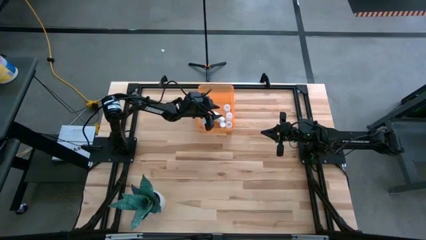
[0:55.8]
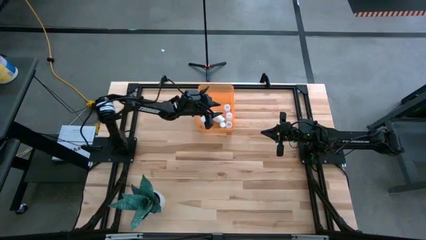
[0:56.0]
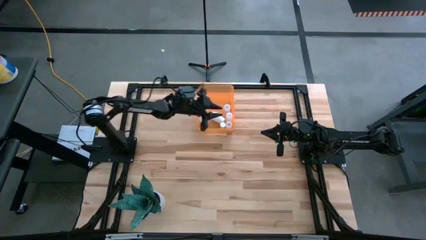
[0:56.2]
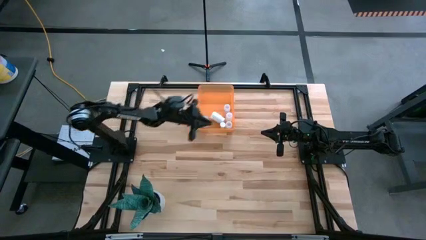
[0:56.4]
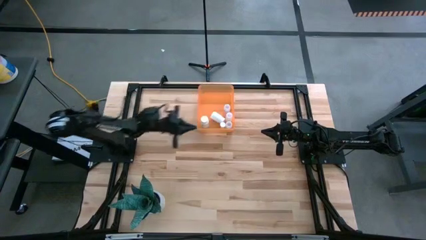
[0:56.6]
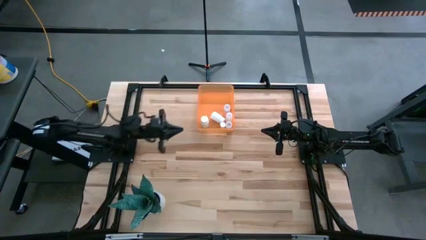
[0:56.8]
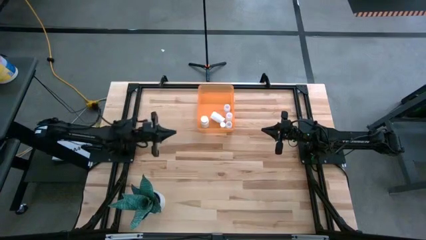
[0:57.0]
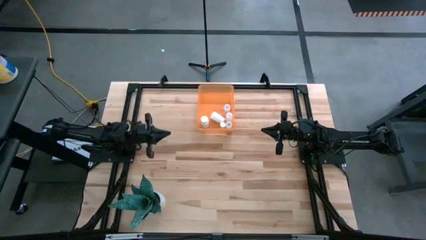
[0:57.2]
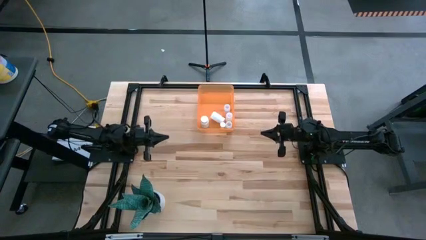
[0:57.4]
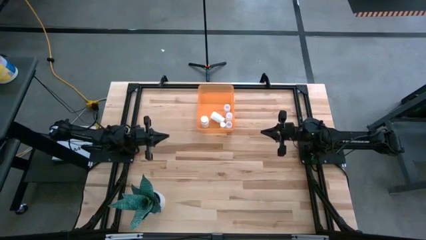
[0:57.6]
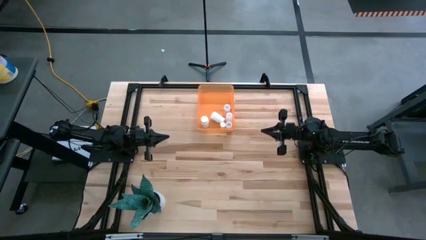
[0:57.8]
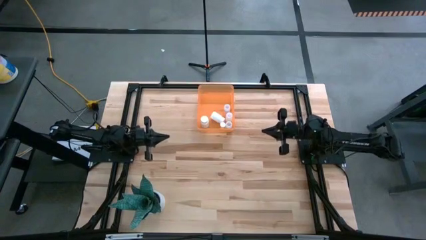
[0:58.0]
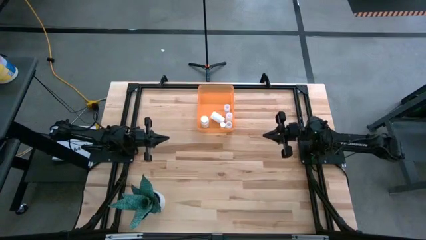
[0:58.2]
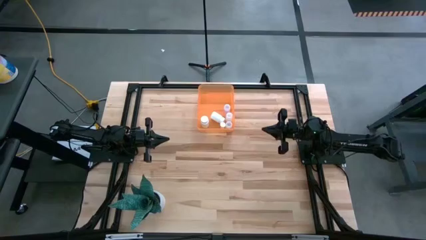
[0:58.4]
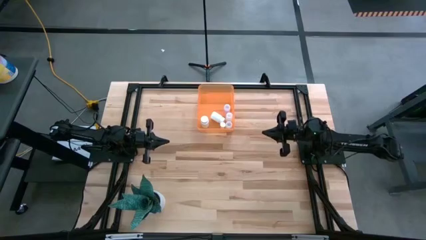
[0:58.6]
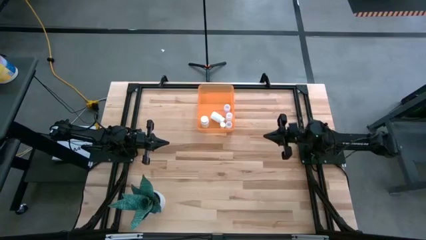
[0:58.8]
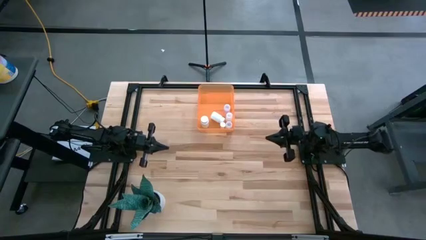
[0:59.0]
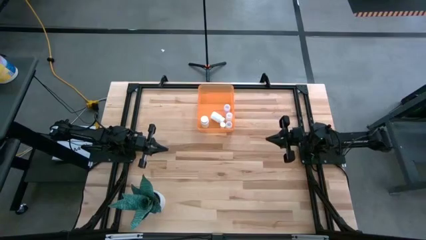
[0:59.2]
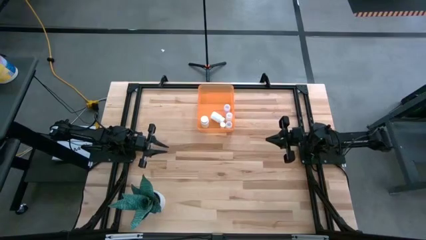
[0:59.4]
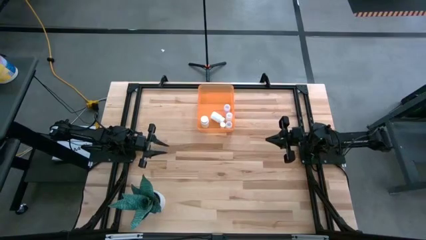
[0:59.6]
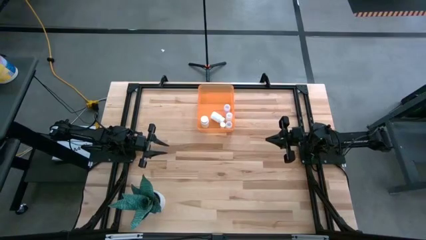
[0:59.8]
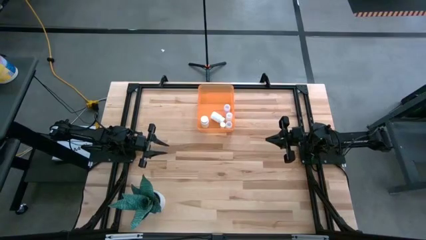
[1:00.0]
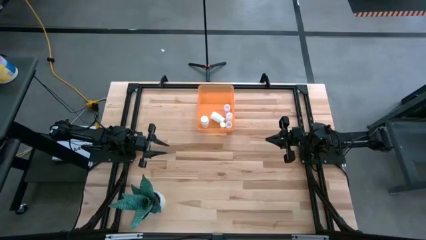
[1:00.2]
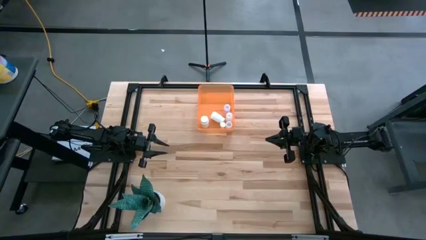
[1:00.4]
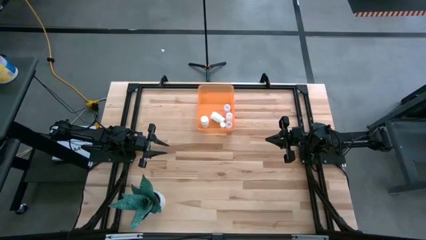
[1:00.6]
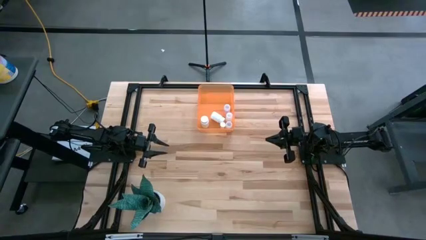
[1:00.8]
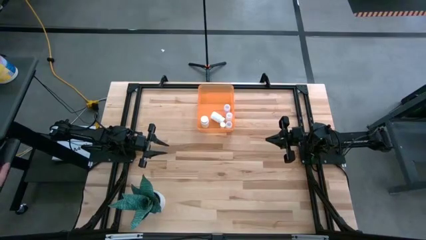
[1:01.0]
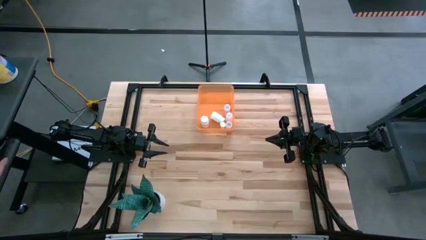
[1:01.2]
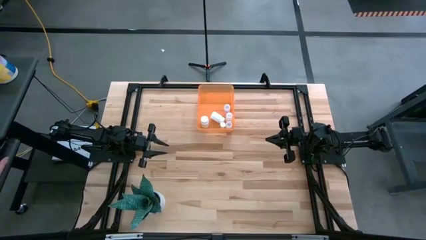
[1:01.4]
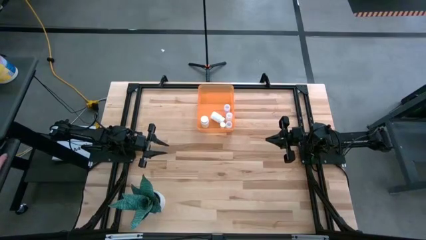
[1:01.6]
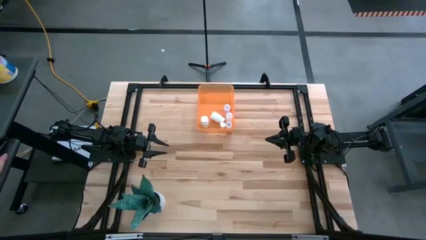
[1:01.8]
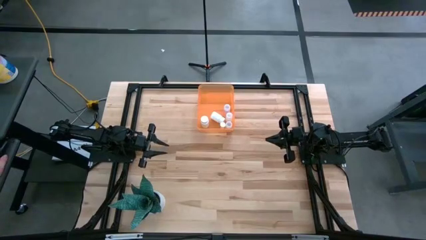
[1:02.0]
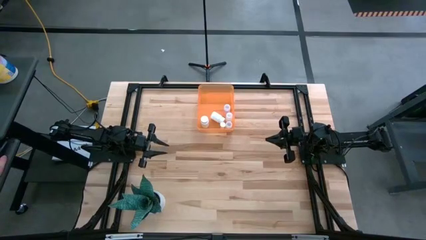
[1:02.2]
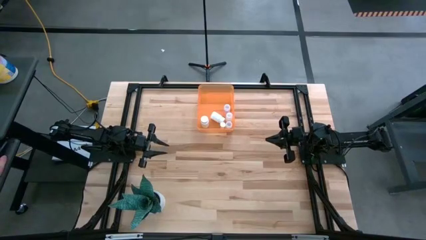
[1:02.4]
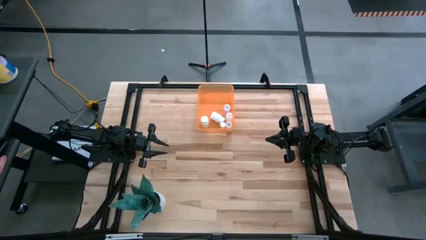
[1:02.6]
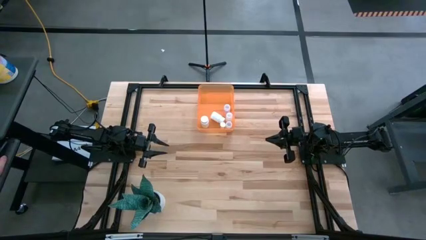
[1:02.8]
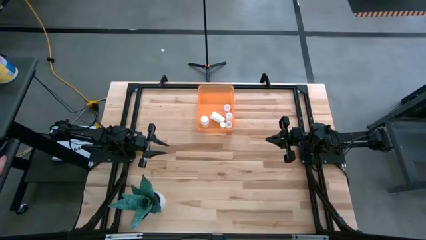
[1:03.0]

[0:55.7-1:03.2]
Task: Pick and place pill bottles into a basket
Return to Home Position

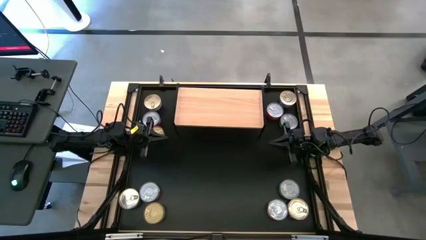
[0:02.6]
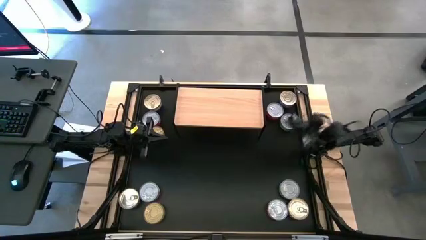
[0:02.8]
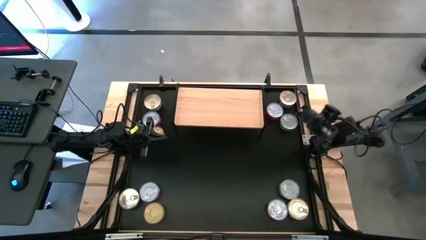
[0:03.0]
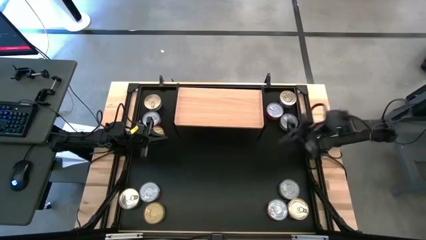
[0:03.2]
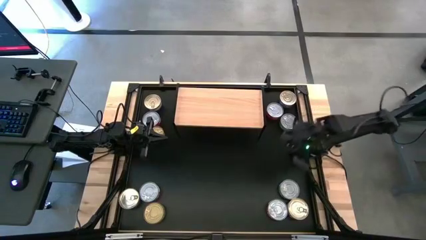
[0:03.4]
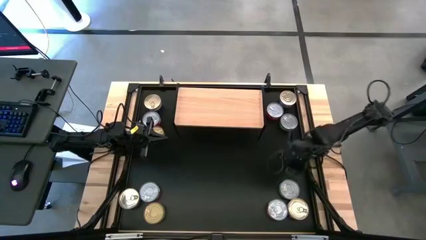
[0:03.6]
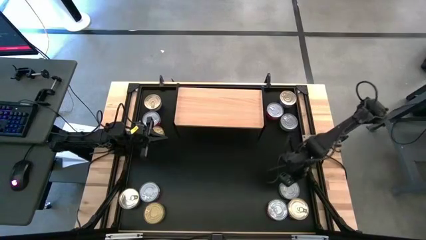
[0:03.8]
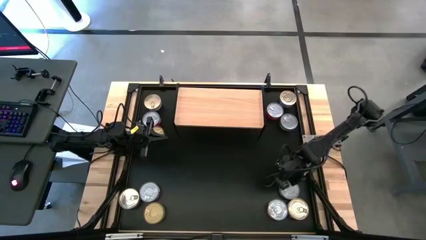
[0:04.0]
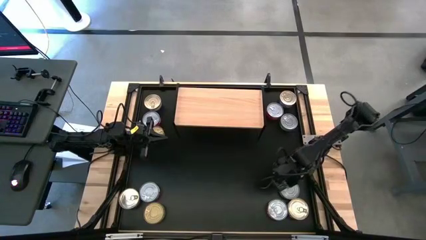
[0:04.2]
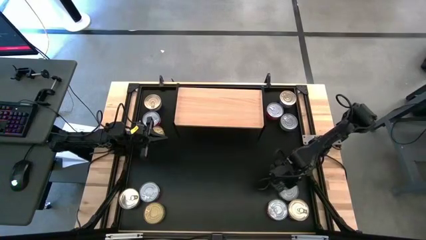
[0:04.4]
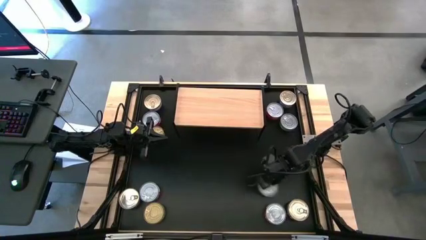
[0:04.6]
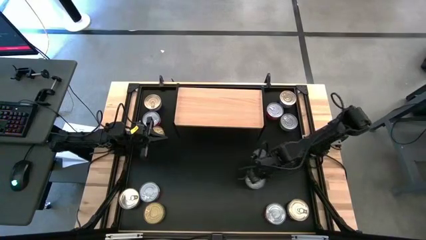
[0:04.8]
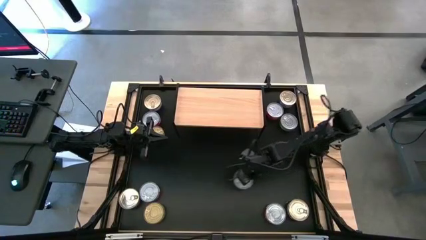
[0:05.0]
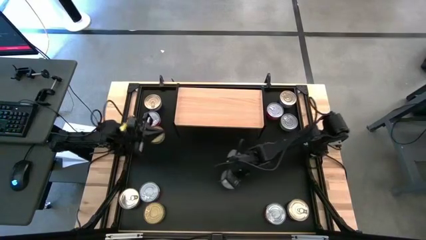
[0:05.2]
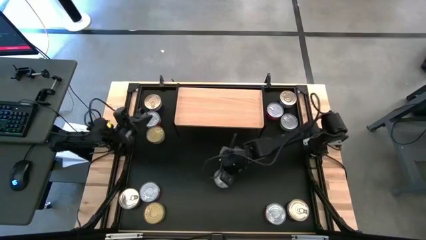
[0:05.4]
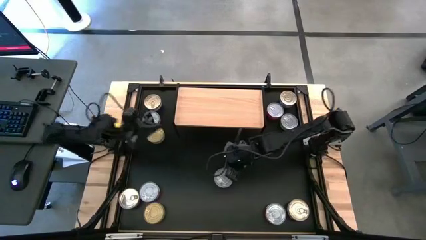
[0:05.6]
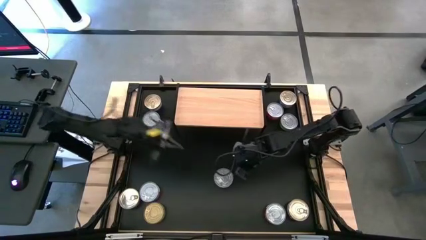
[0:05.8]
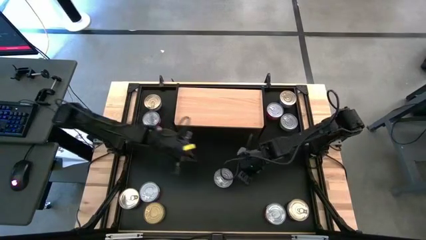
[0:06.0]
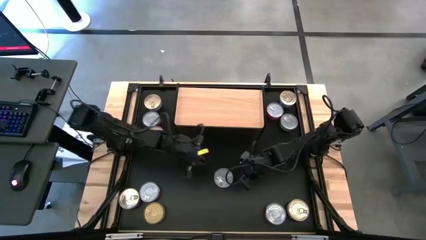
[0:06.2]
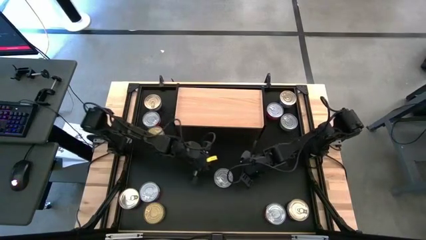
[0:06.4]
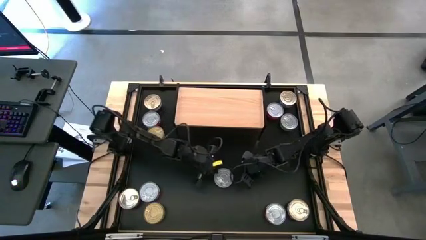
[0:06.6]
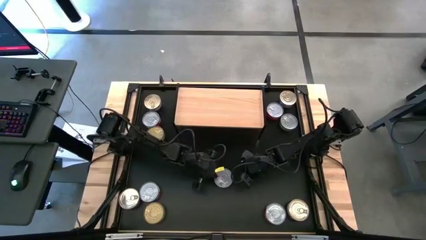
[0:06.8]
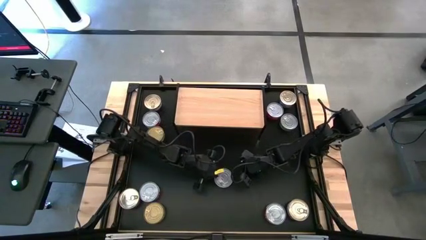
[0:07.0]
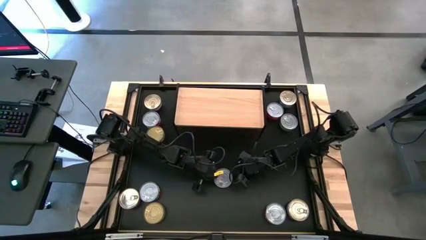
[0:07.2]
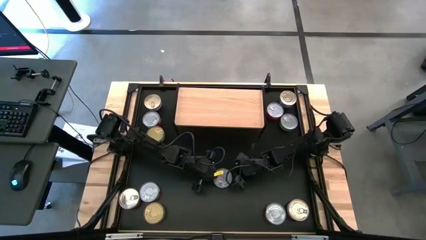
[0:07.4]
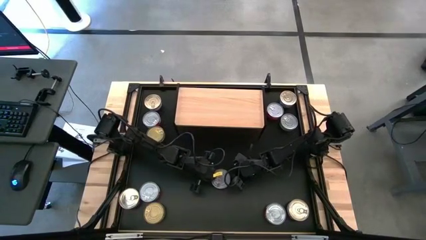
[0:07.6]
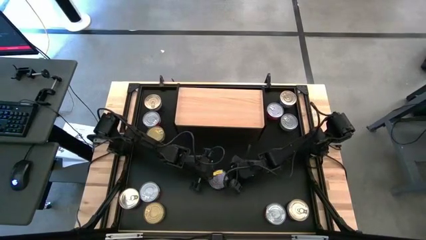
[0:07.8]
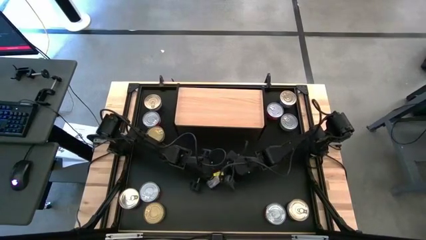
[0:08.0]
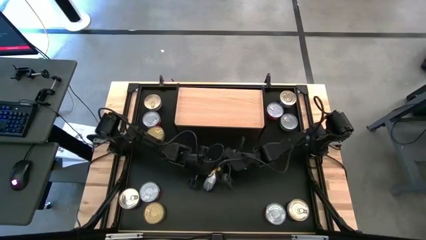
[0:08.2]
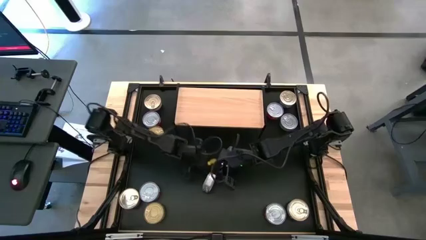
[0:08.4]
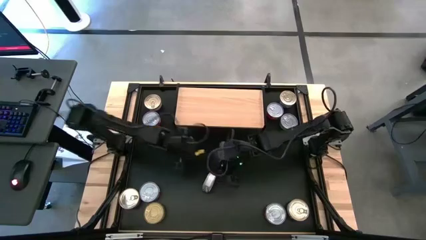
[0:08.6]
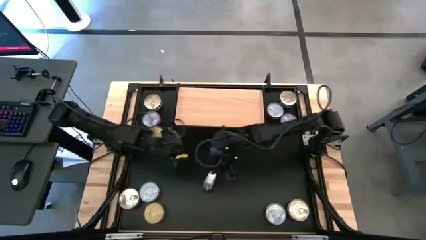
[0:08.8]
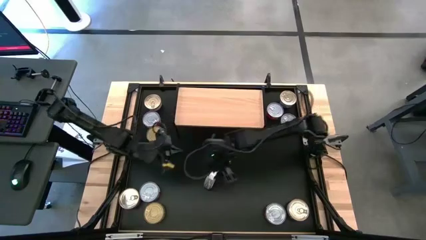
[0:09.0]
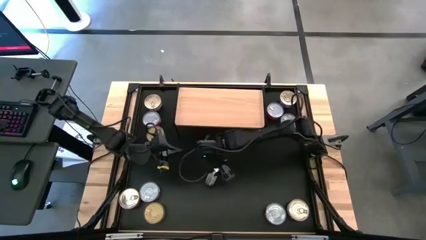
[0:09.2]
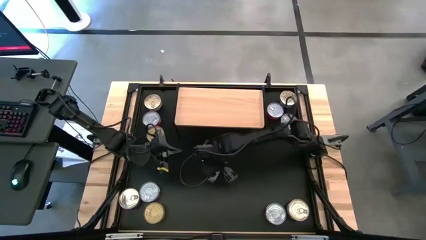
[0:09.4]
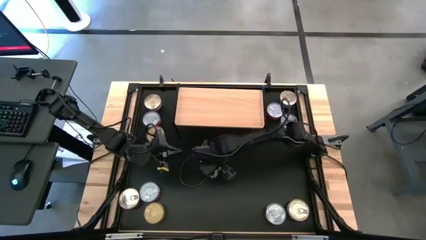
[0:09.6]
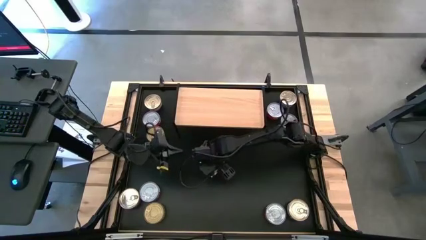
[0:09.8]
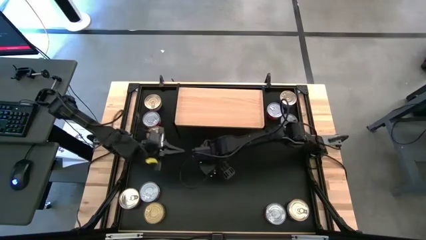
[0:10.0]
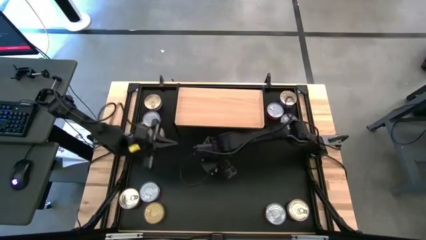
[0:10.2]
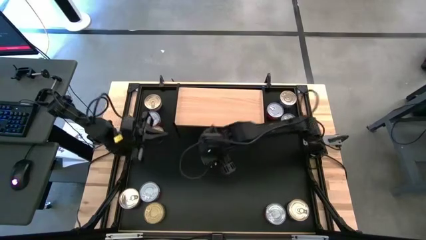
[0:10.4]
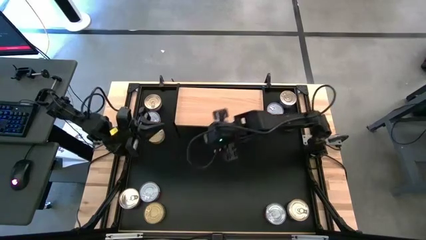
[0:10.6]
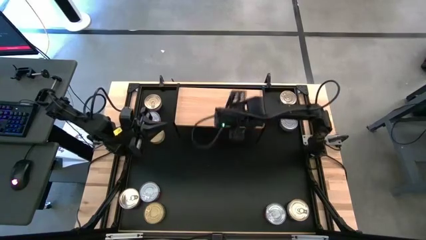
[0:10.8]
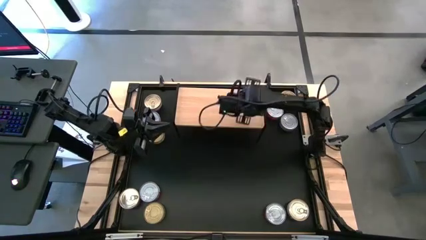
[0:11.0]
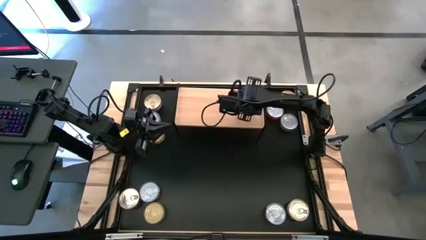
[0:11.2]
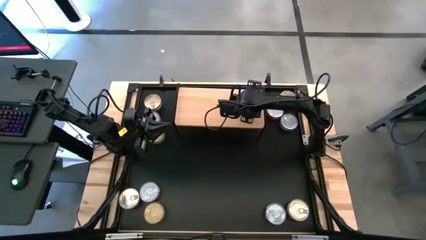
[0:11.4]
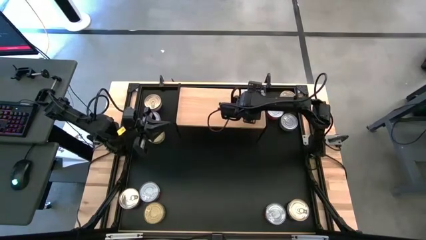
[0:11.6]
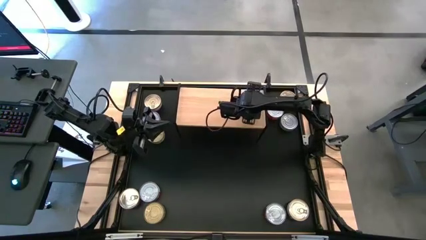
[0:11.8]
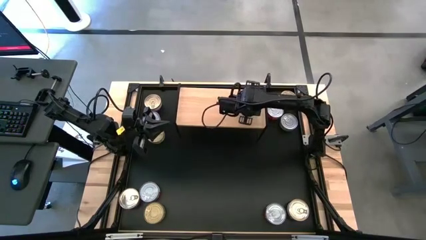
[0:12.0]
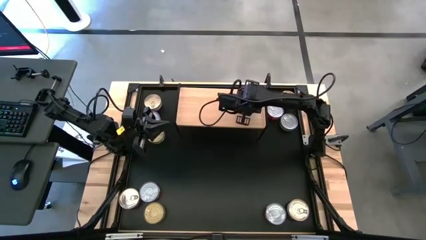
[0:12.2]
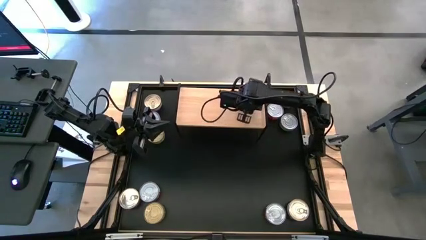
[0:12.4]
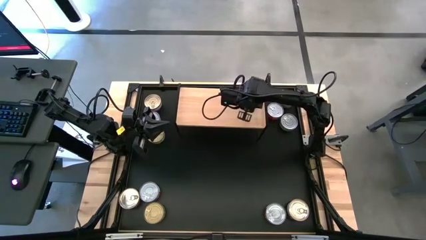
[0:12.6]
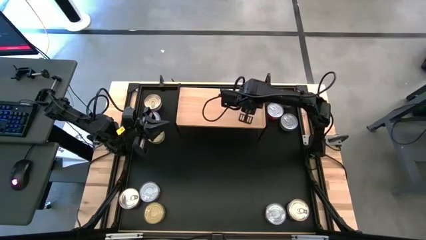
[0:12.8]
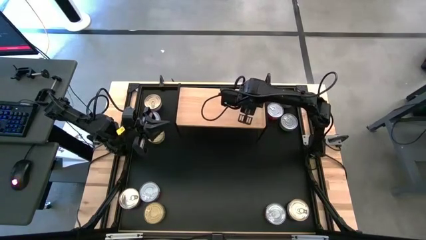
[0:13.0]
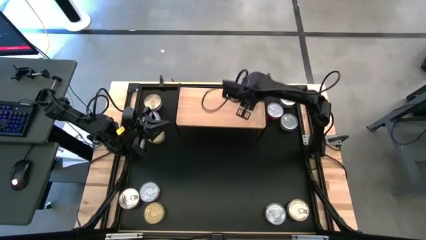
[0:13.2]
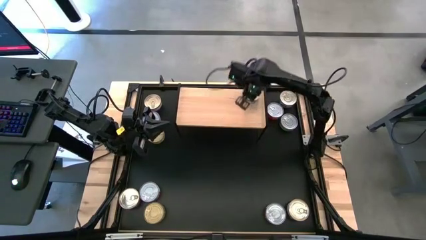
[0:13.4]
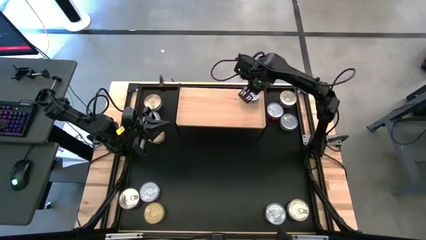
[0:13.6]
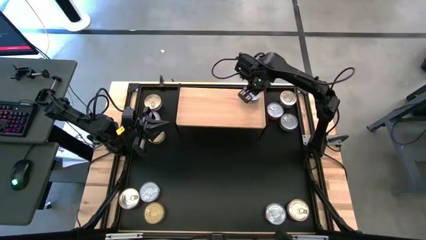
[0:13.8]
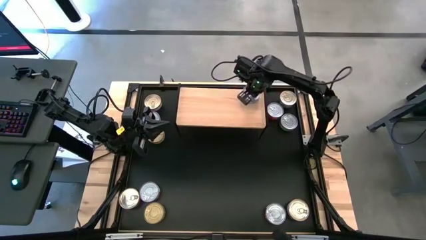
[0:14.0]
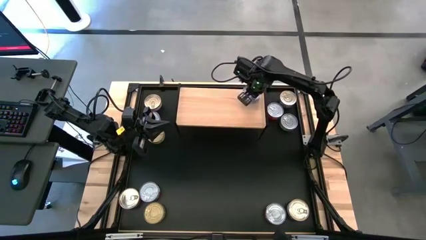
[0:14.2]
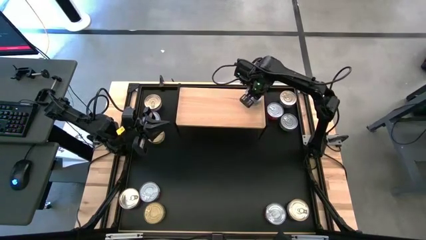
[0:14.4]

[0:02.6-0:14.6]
Task: Stack canned seafood by type on shelf
Put the green tuna can on the shelf
